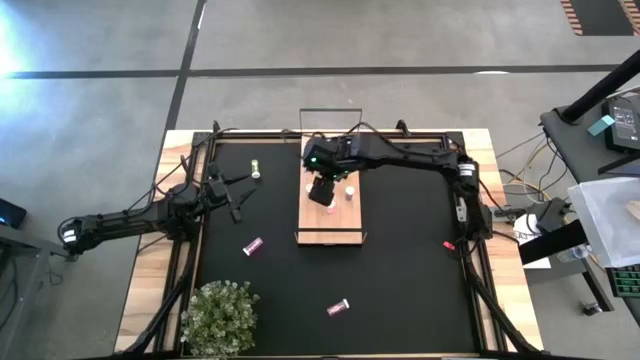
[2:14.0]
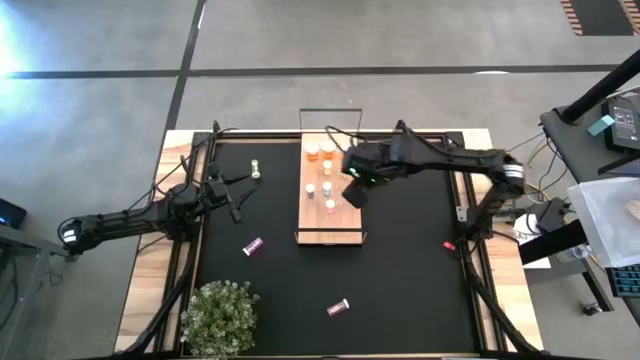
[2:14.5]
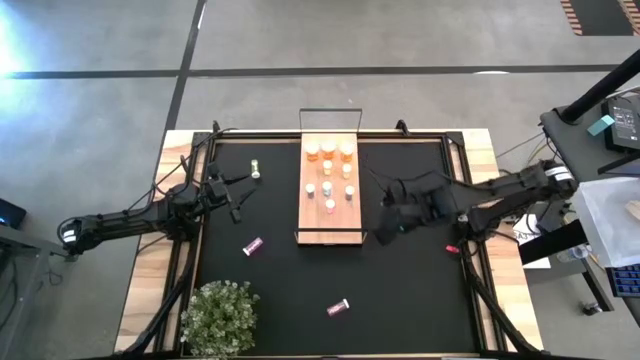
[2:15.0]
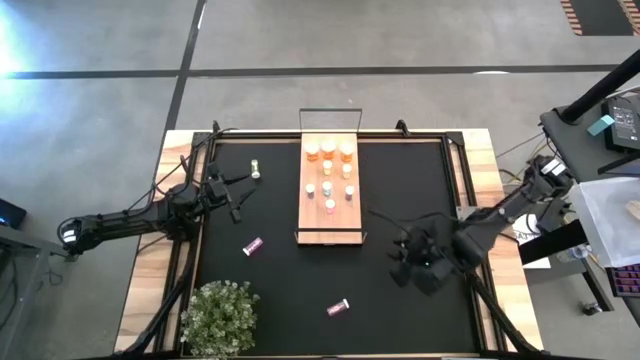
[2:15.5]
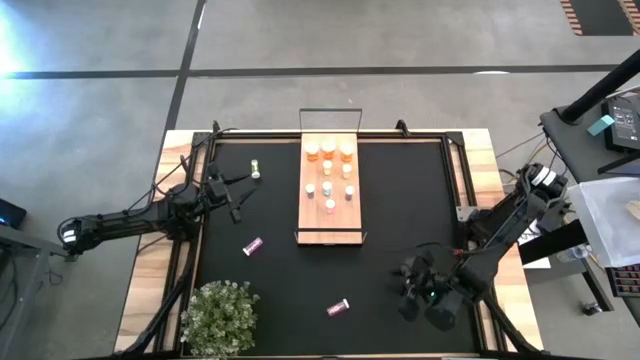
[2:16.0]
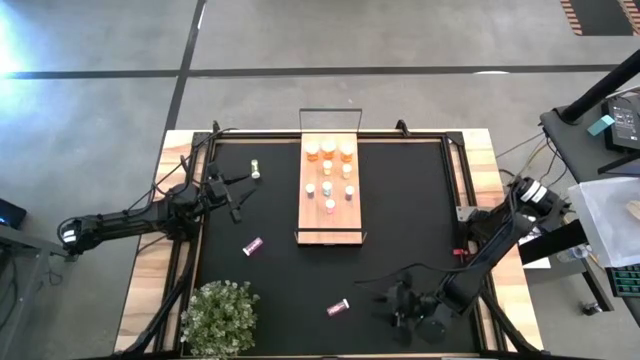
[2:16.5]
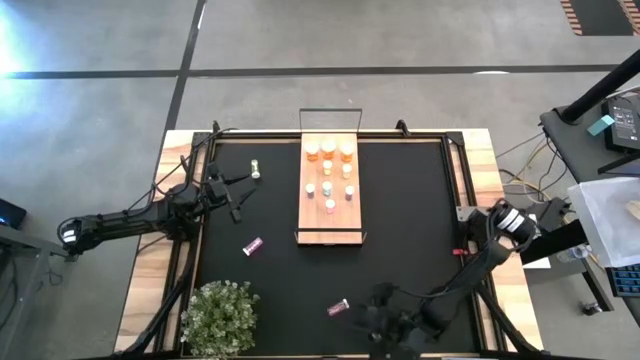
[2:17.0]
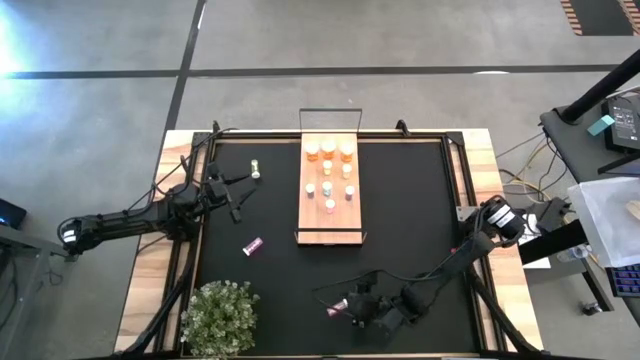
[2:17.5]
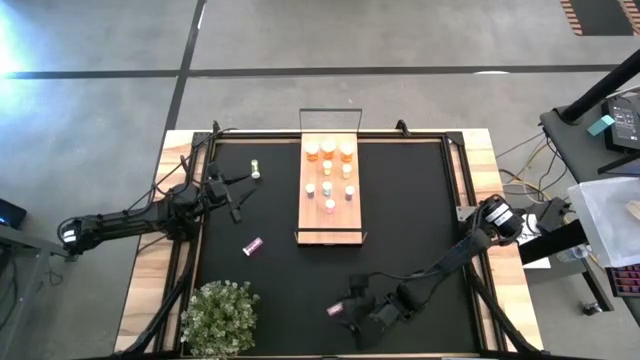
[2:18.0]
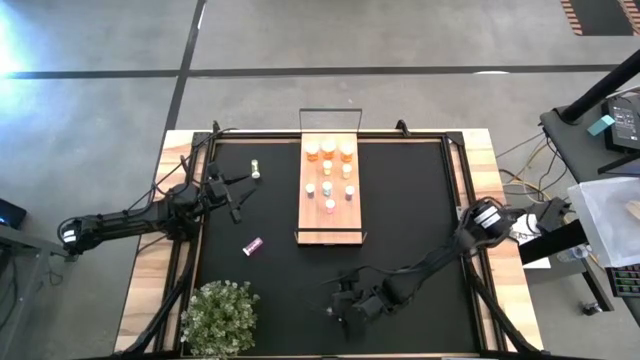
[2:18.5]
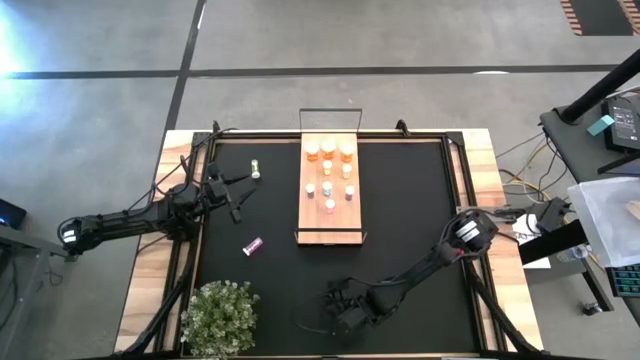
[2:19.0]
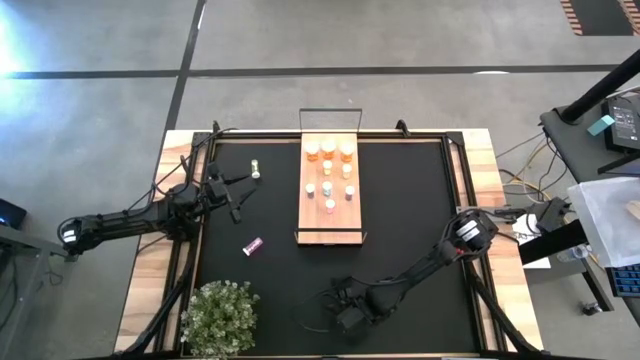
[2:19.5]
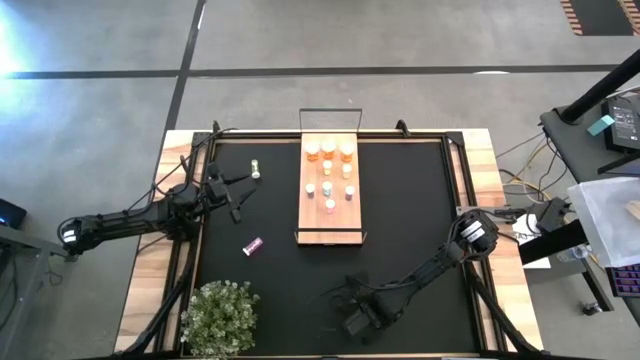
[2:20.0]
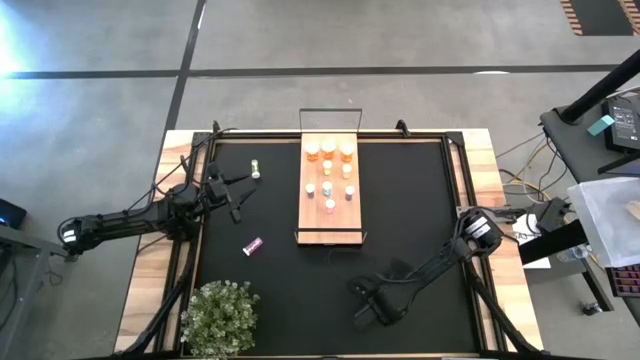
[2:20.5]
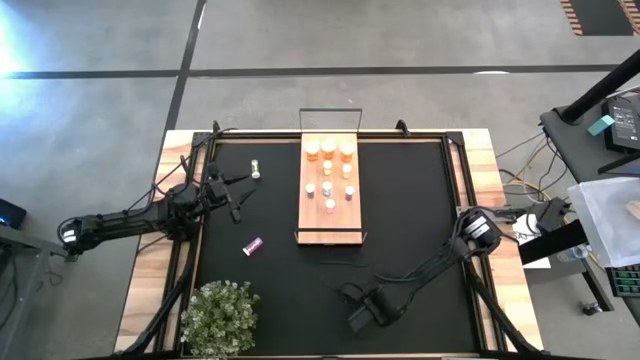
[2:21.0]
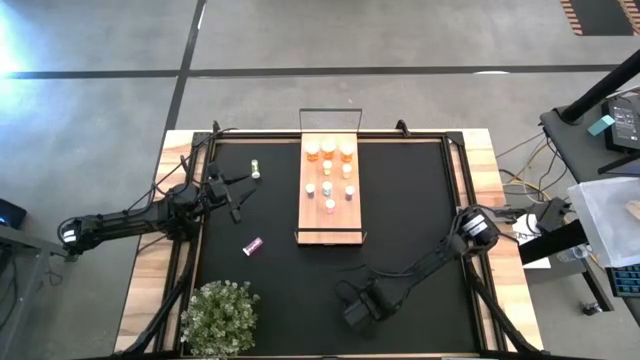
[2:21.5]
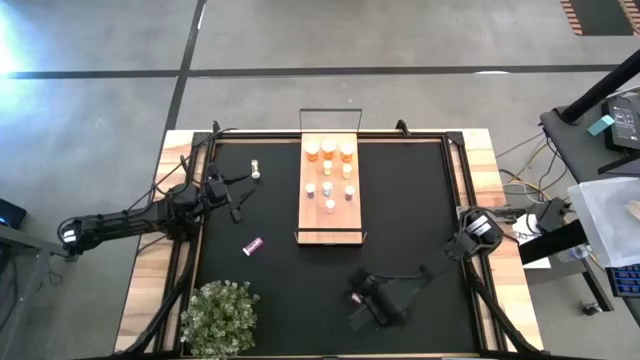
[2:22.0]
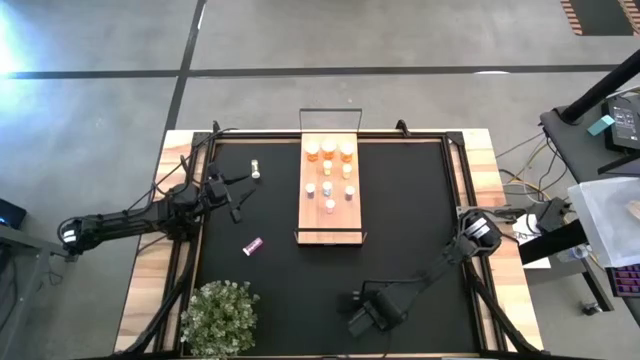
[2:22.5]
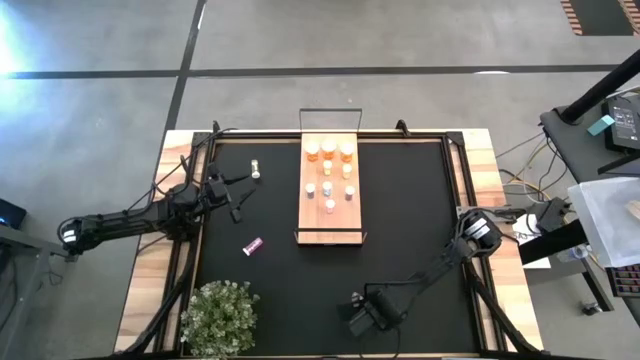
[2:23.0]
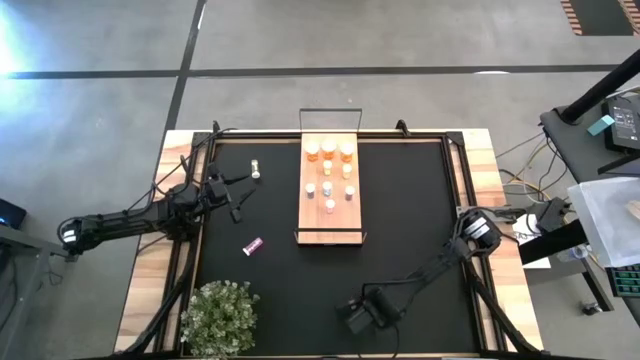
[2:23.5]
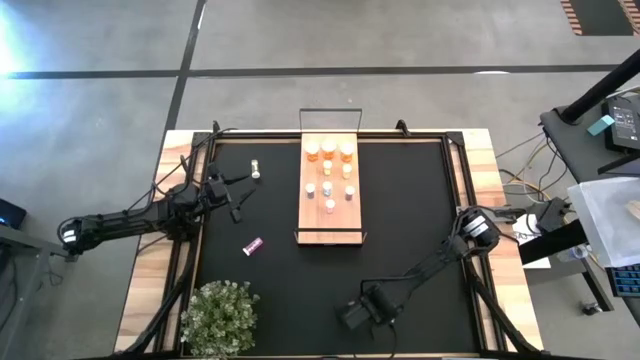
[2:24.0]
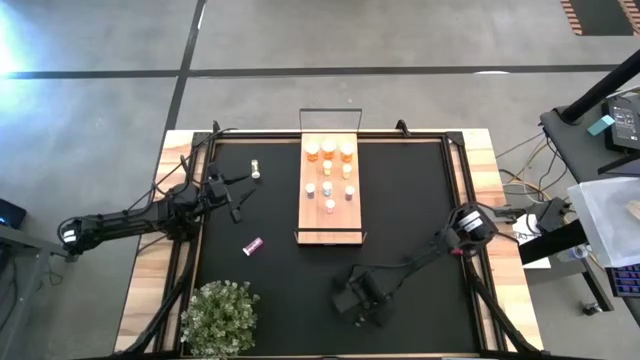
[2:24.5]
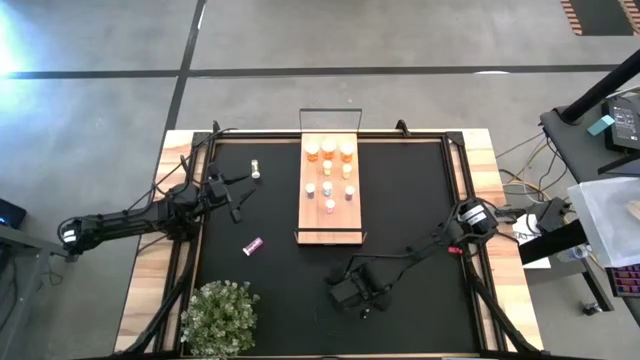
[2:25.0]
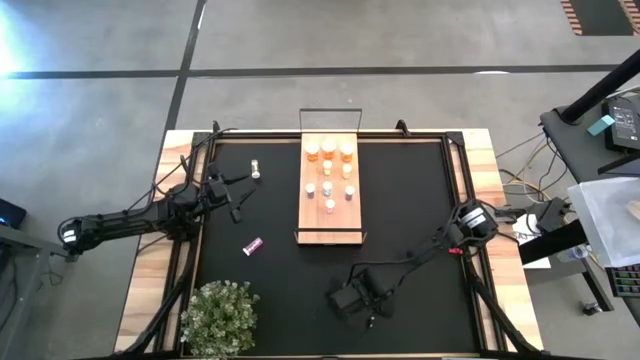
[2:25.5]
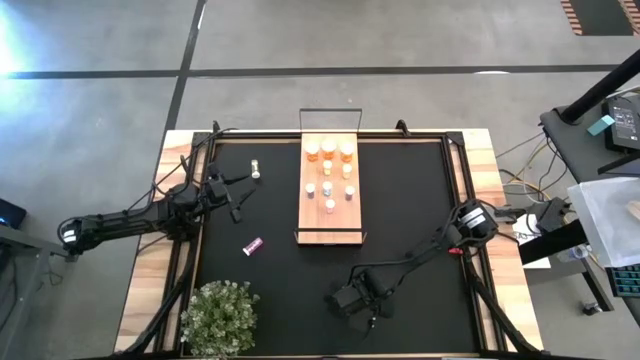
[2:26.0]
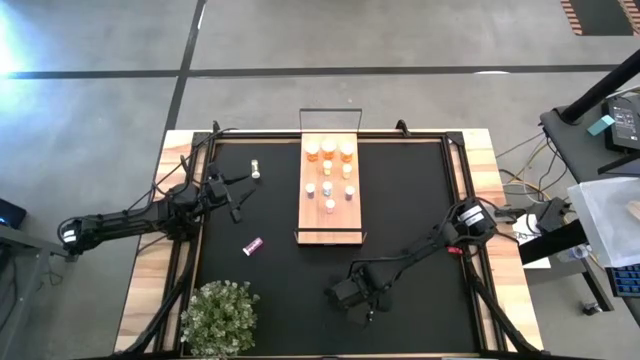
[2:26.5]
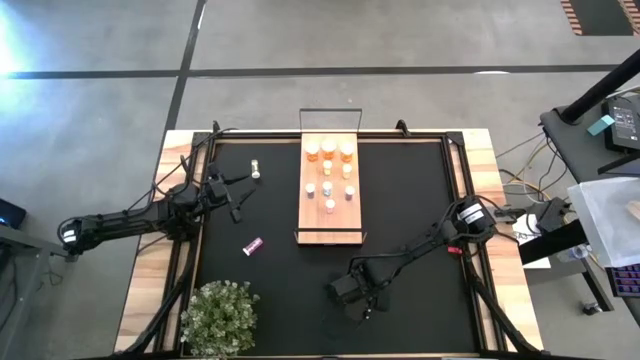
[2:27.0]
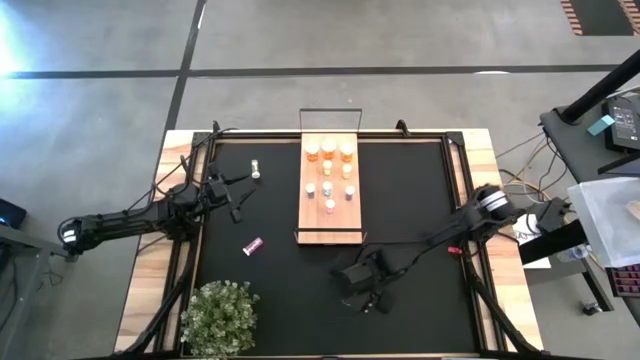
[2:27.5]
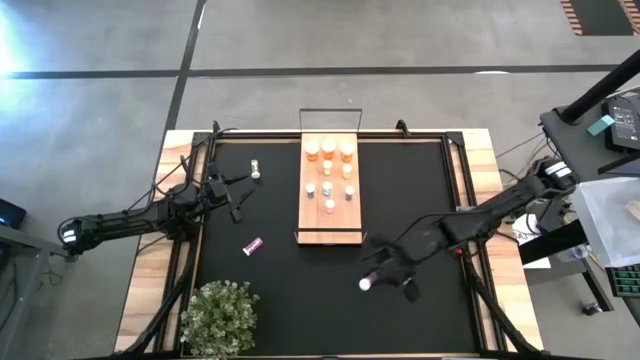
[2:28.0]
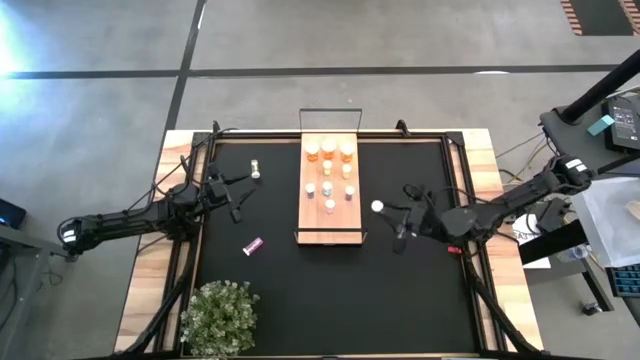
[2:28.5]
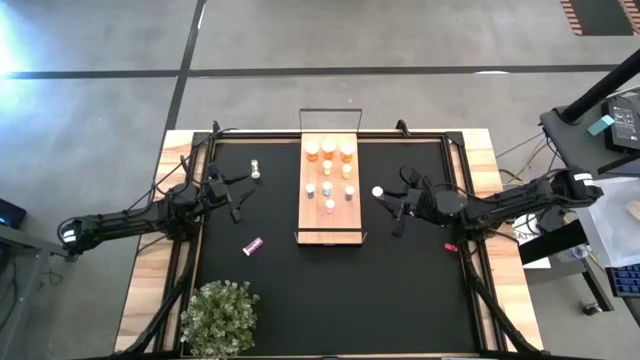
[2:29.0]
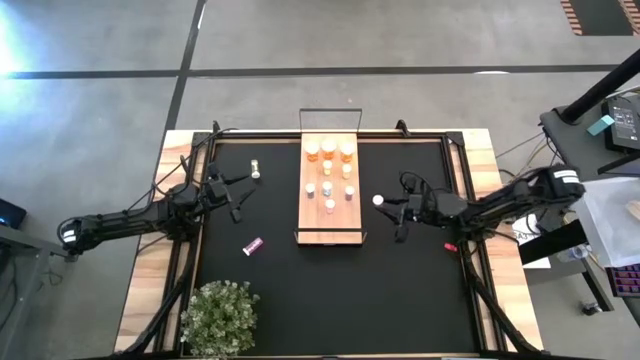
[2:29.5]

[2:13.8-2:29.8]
Task: Pick and place medicine bottles onto shelf by color
Put the bottom pink medicine bottle on the shelf aligned with the other pink medicine bottle

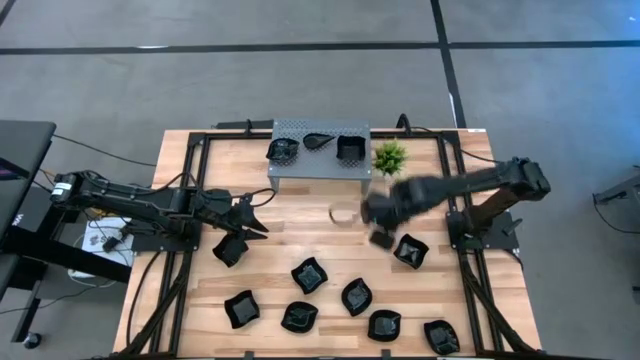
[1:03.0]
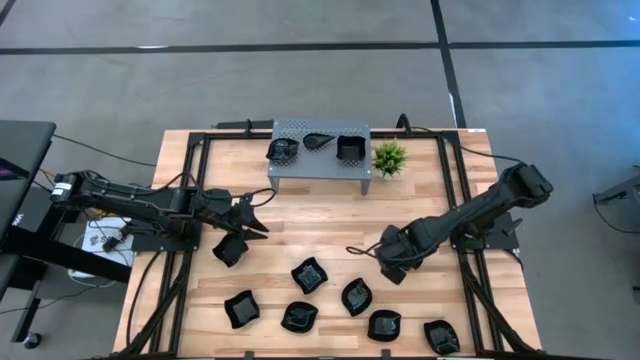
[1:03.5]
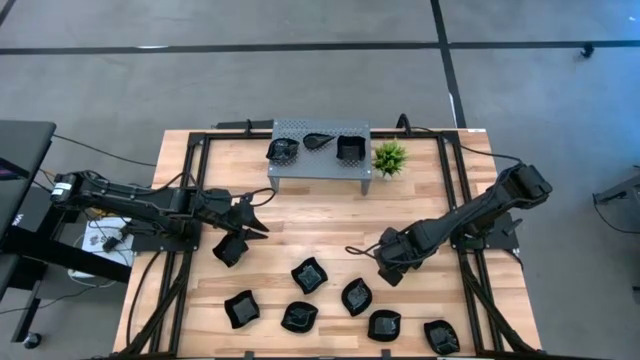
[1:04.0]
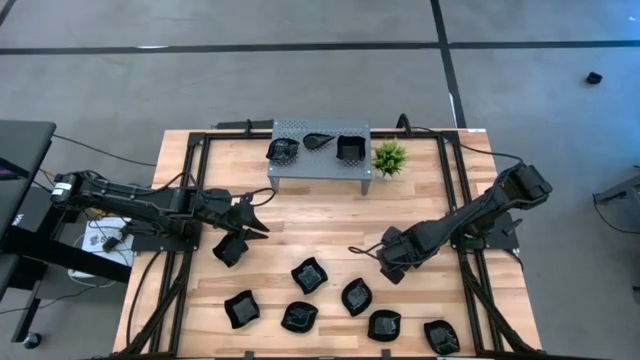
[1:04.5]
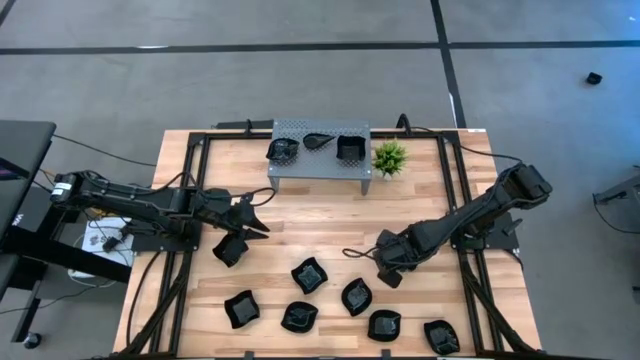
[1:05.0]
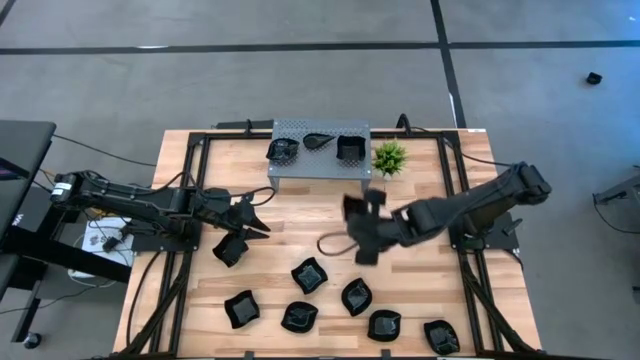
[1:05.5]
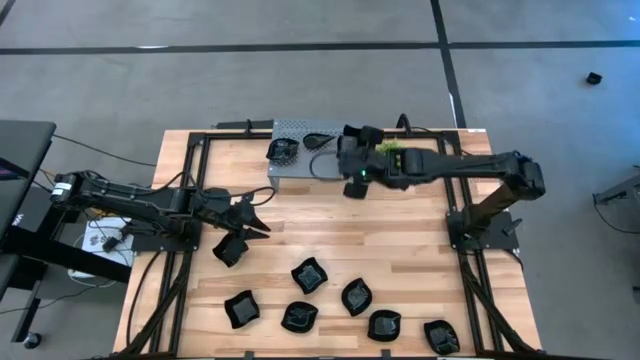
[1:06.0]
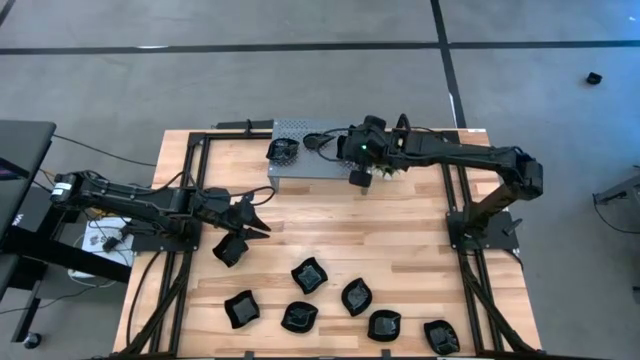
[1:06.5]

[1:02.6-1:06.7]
Task: Pick & Place Mini shaped plates
Stack the distorted square plate on top of the distorted square plate on the shelf
